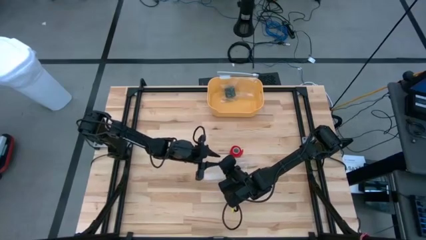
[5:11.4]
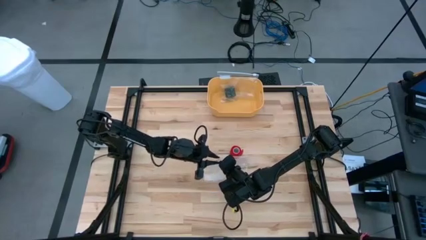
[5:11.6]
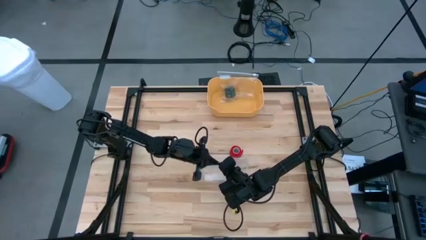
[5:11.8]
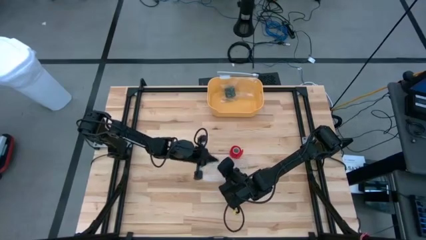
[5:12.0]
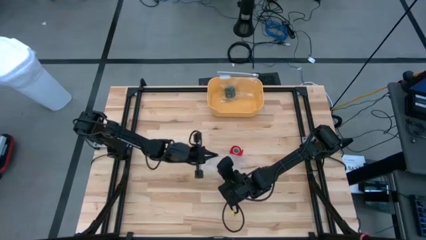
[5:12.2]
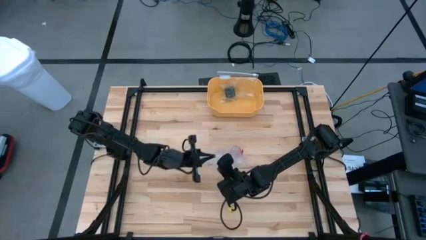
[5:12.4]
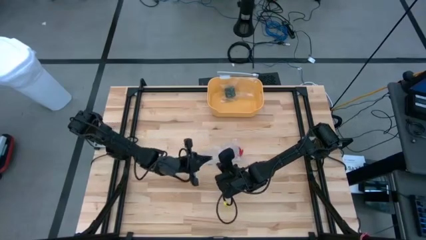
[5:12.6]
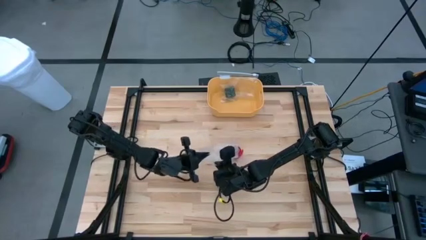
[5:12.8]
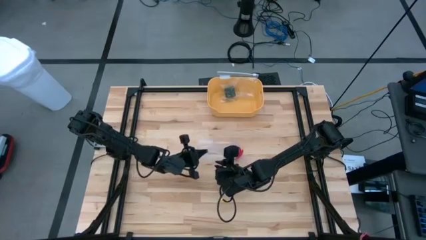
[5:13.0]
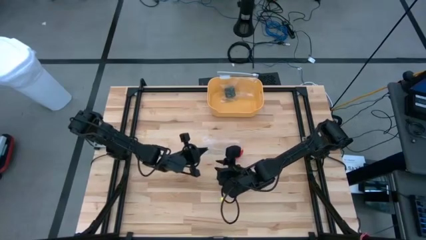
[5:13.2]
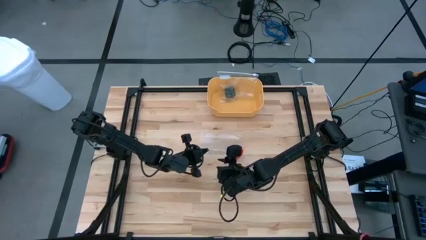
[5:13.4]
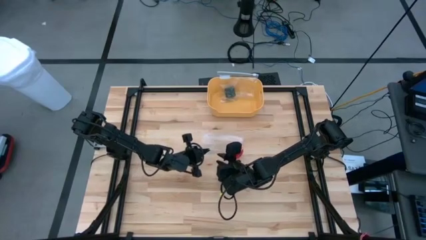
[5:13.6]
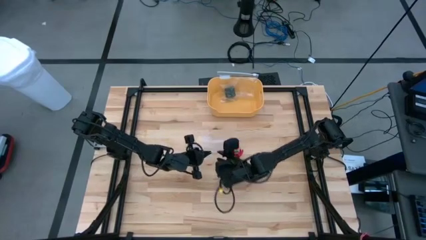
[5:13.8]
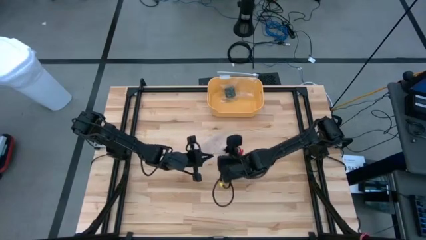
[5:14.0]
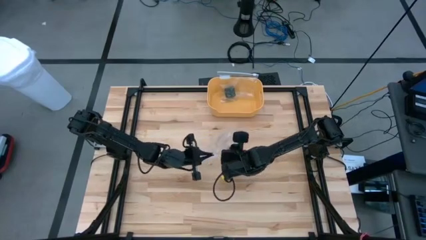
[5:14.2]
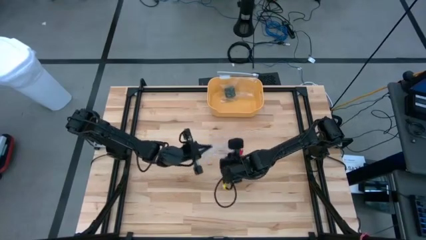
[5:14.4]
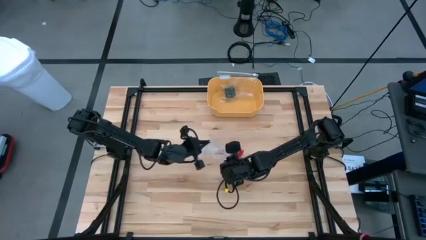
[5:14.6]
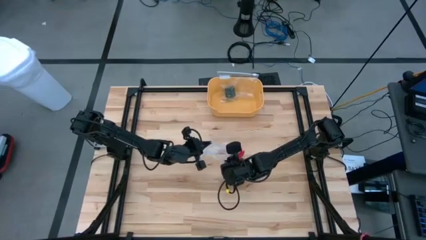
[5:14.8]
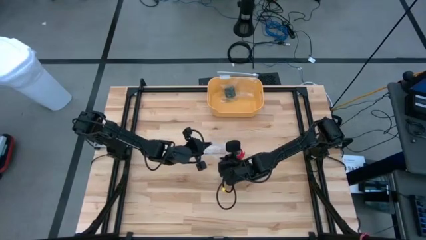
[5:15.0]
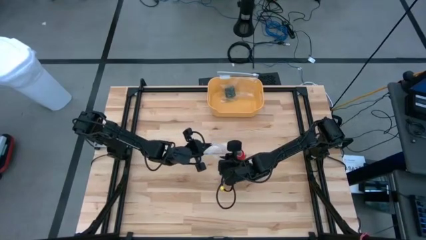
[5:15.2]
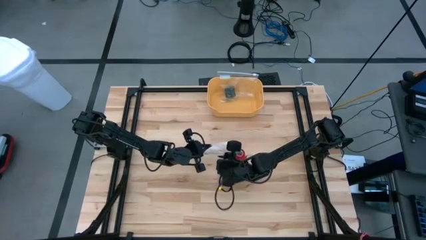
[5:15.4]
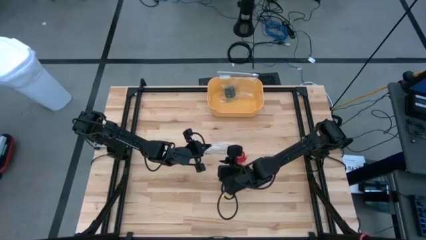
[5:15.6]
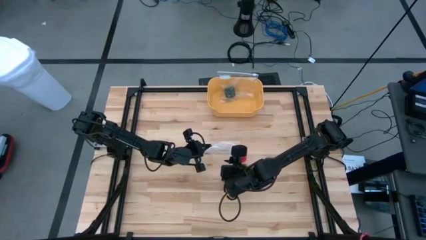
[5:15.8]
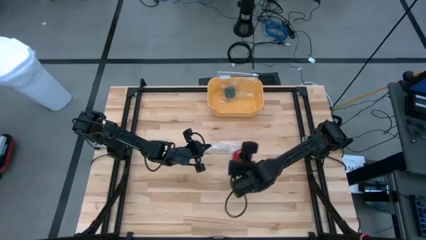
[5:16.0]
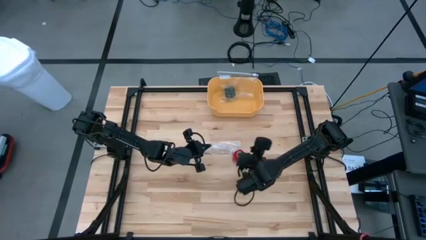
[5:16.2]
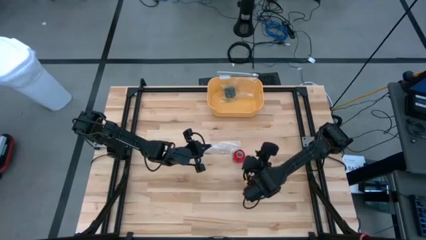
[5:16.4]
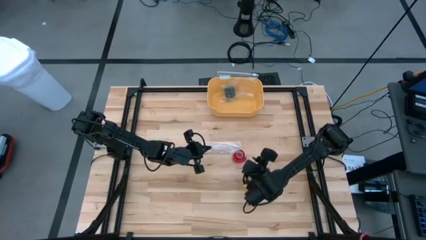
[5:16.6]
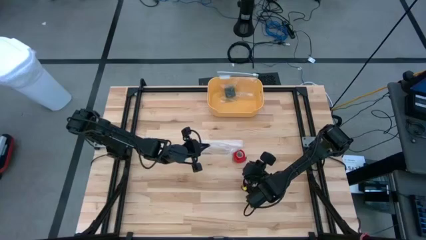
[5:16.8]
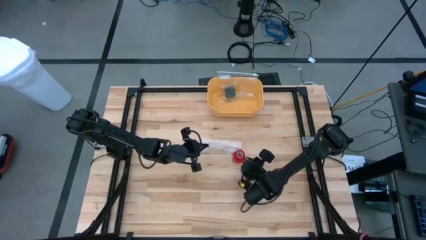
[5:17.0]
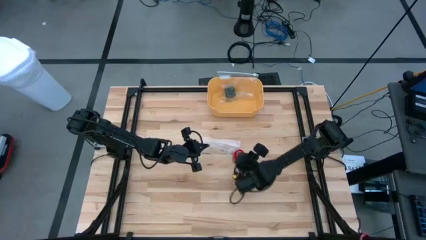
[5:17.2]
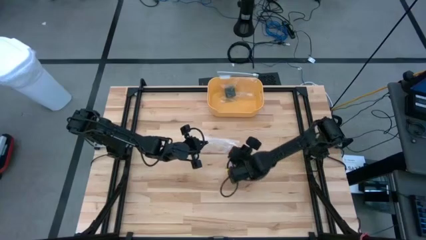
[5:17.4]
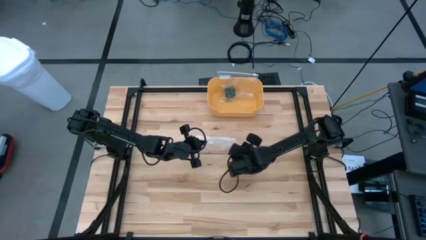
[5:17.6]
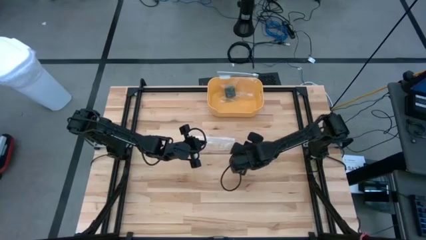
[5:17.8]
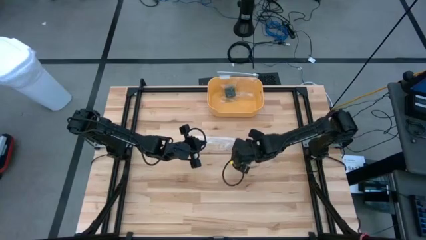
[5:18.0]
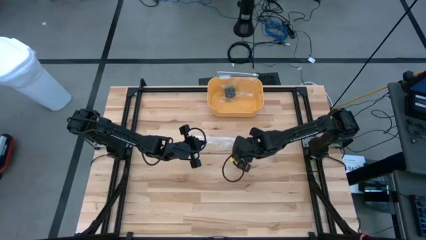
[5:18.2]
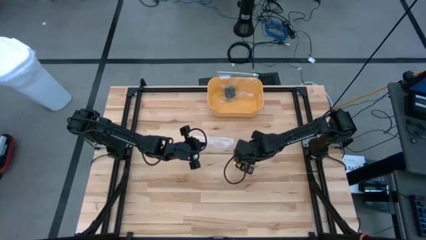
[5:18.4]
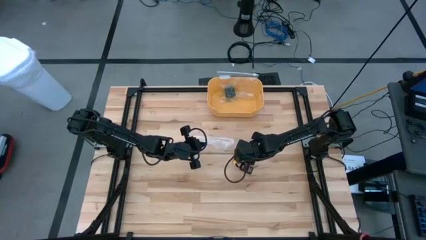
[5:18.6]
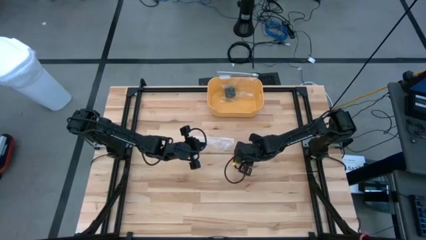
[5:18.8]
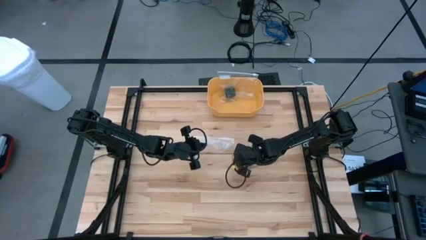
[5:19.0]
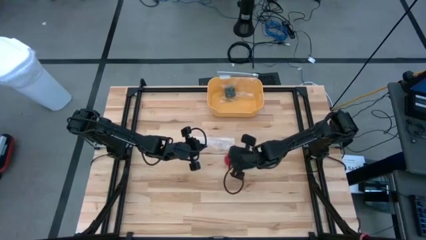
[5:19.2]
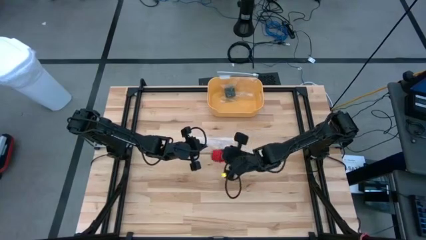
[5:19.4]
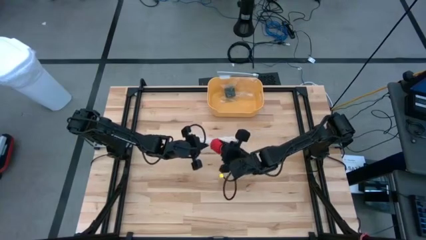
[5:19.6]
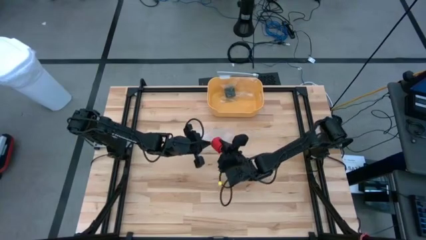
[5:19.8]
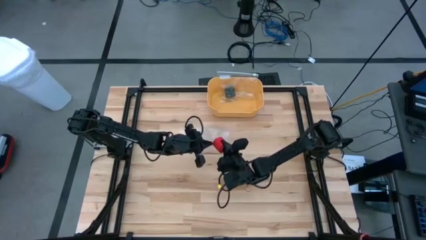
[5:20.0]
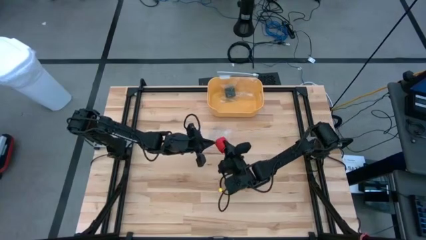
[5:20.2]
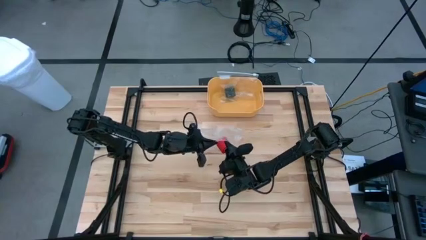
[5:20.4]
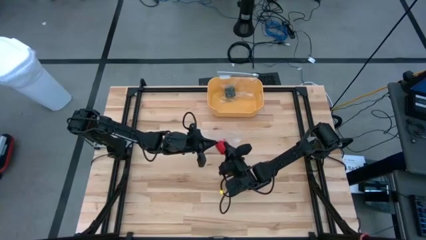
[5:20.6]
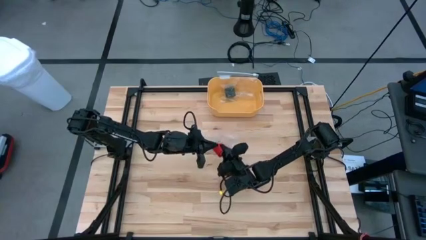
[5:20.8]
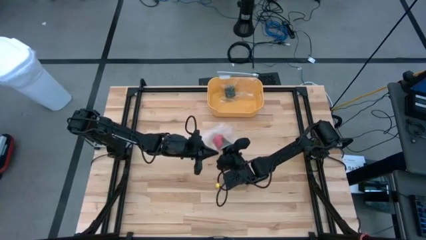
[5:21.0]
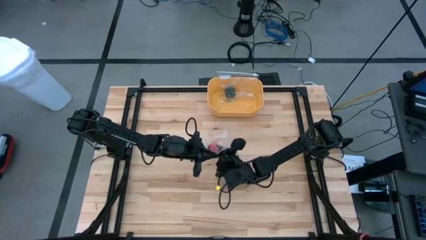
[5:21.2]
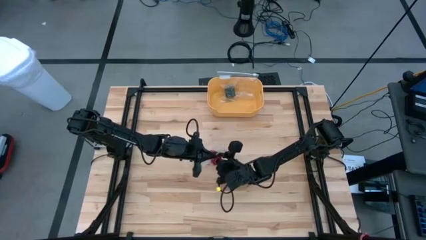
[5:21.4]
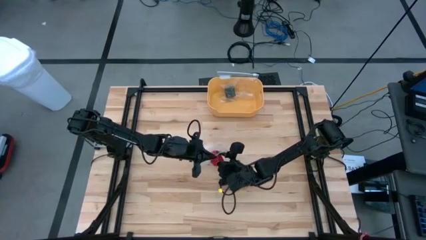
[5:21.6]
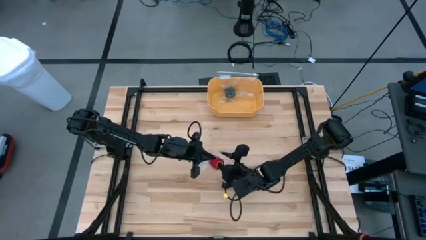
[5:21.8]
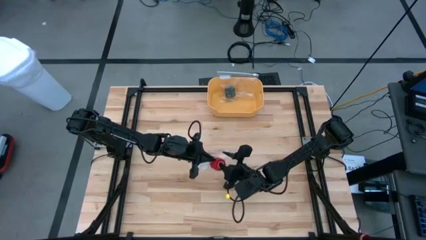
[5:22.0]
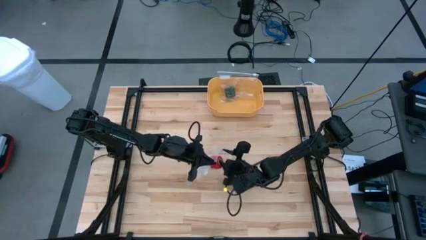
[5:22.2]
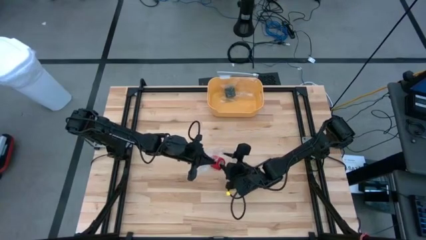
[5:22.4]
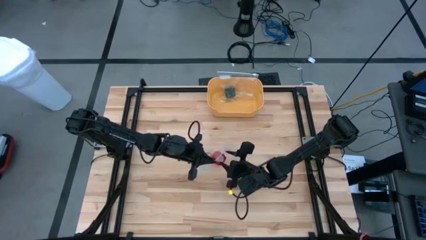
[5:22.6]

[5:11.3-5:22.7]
Task: Roll bandage
Put the rolled red bandage into the transparent zip bag
